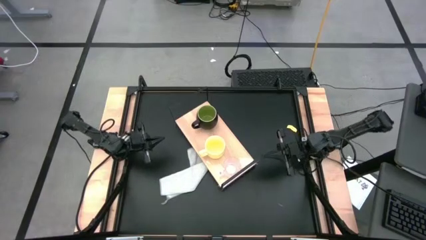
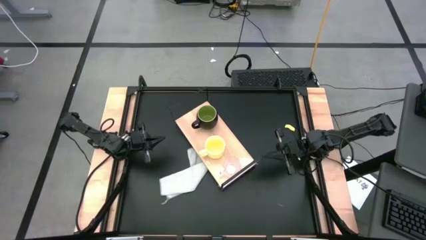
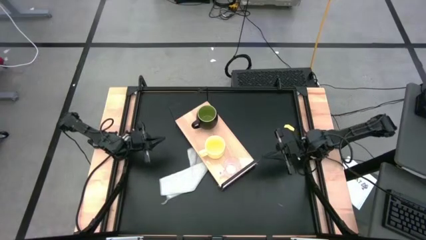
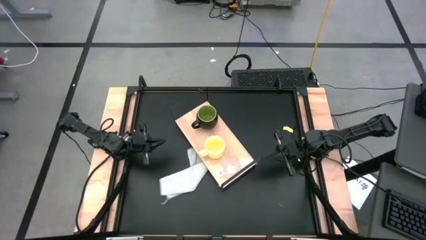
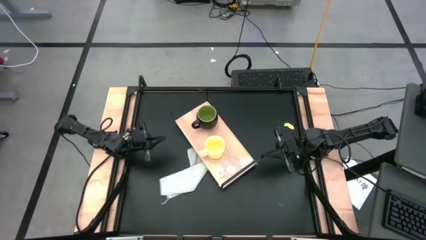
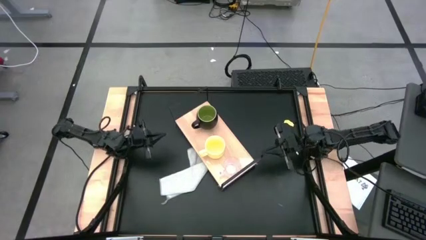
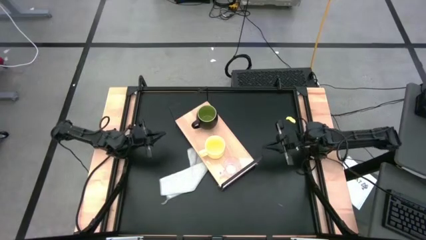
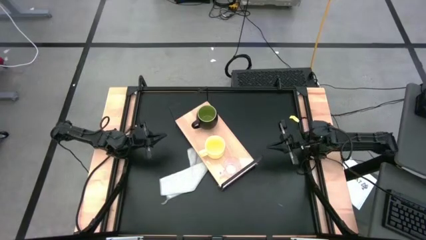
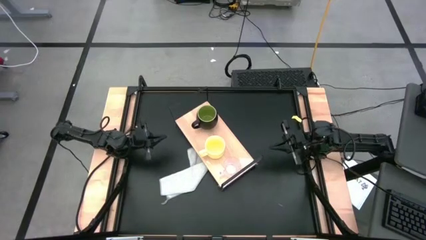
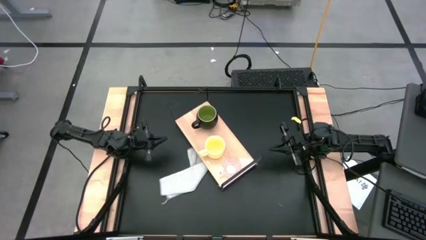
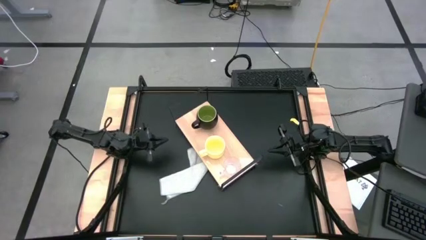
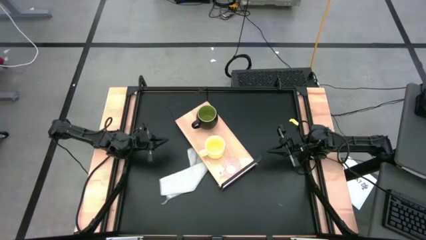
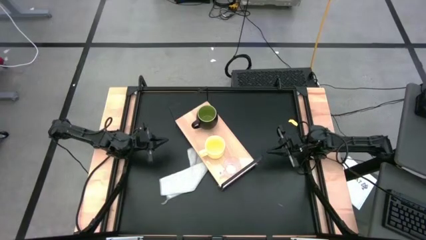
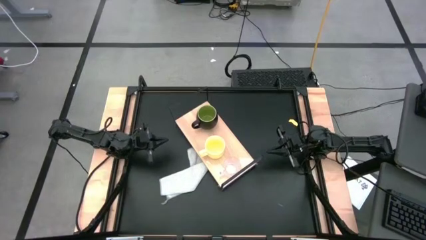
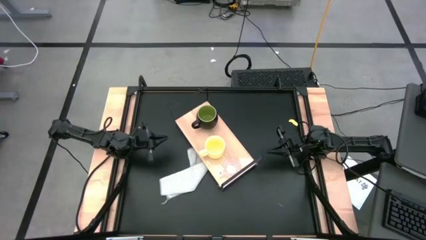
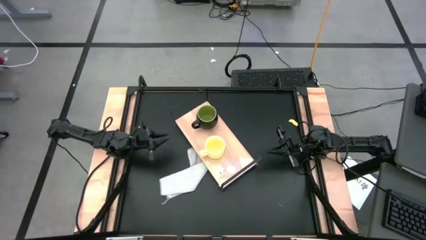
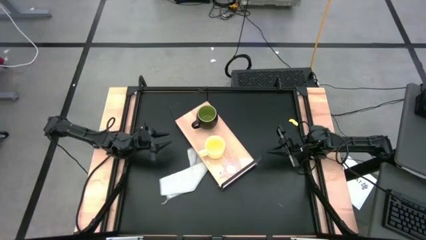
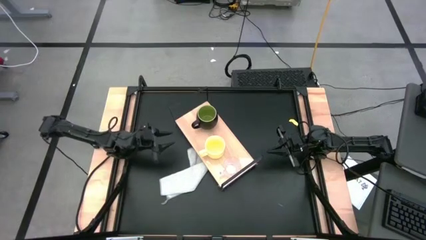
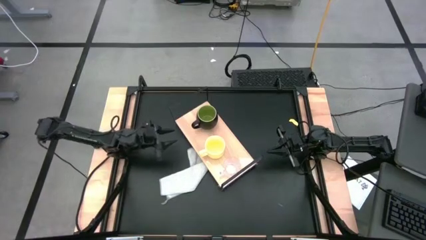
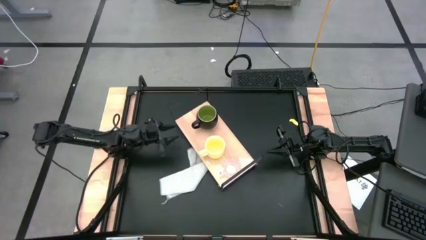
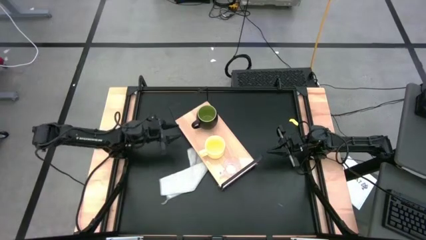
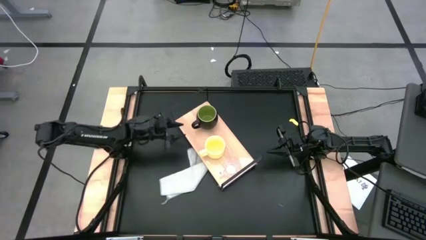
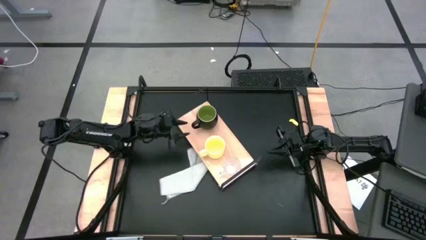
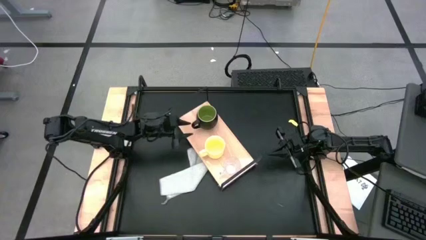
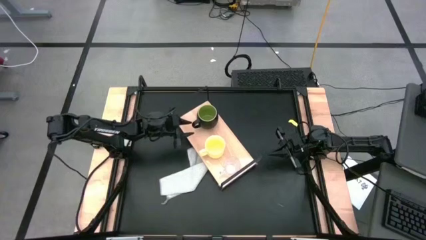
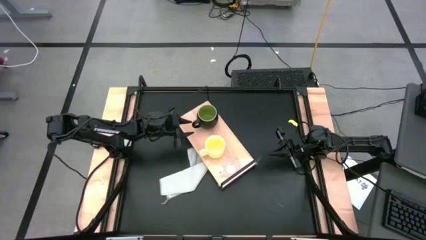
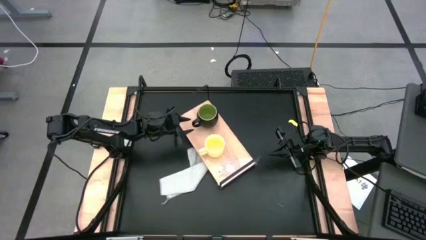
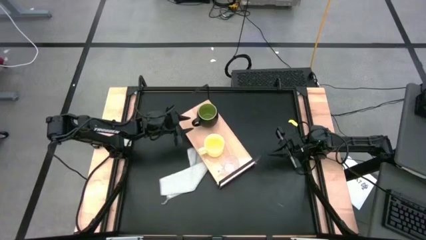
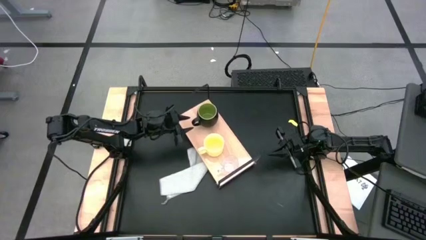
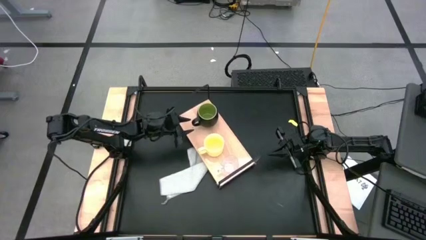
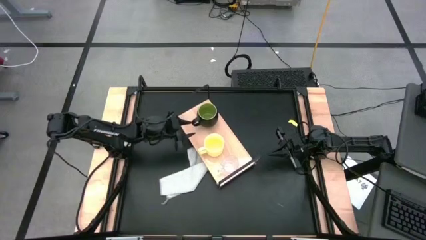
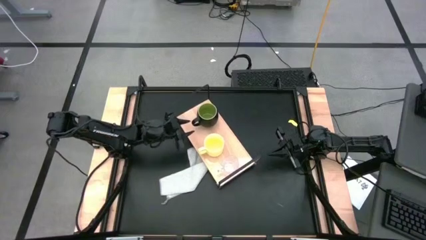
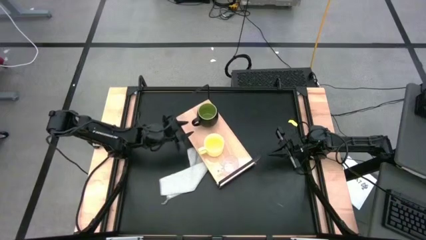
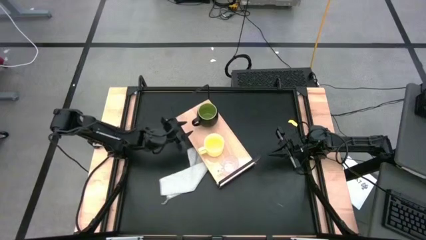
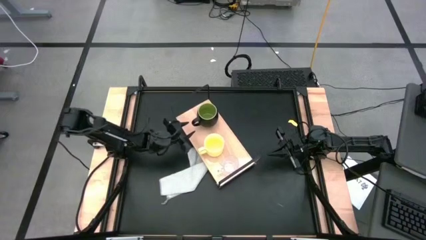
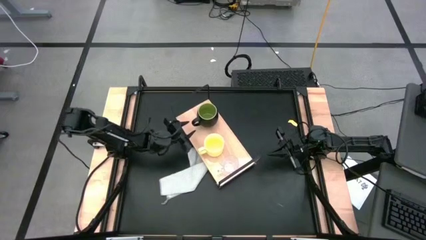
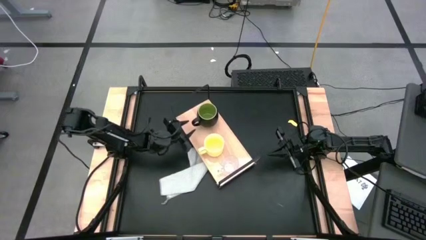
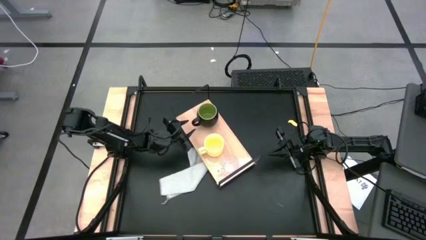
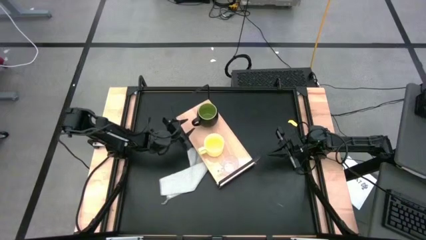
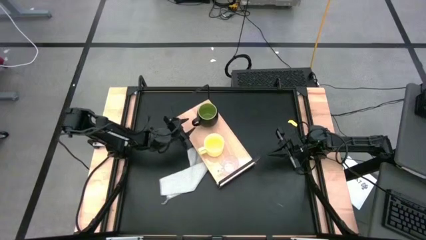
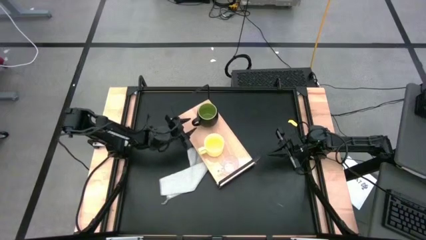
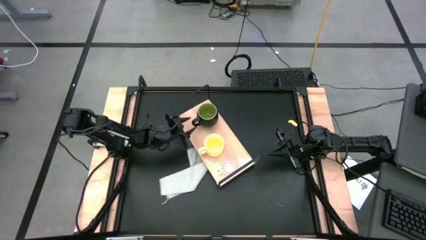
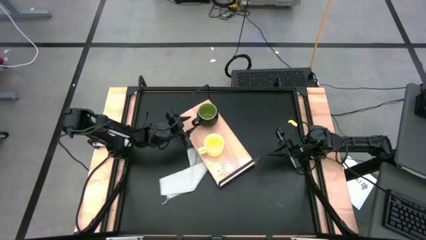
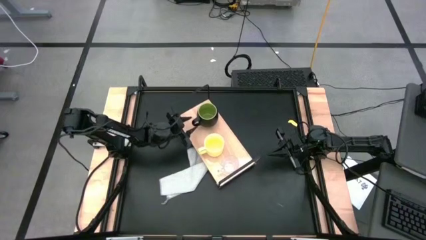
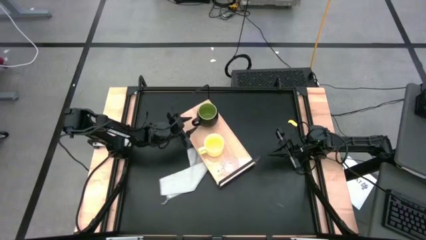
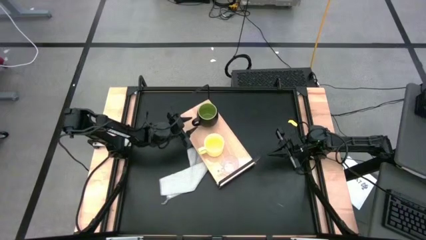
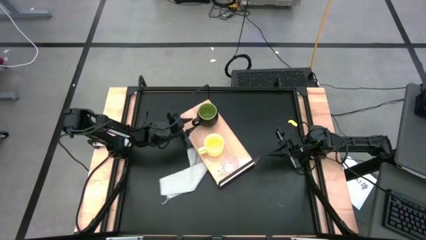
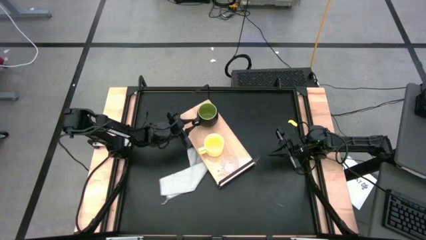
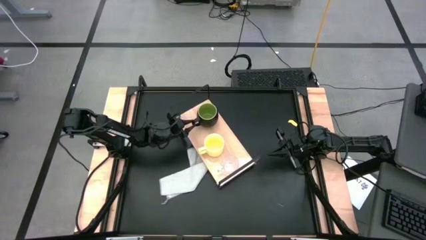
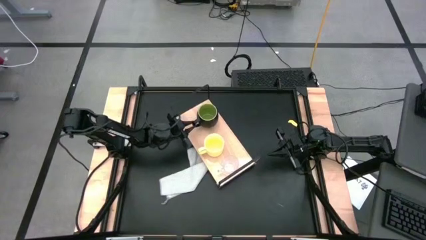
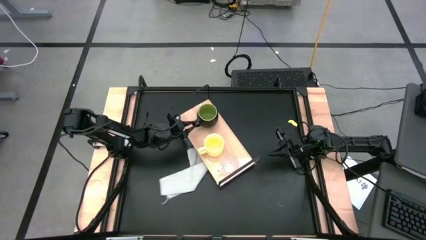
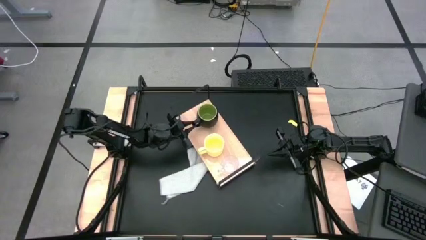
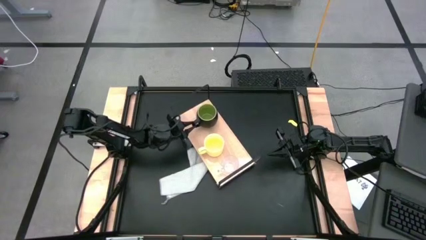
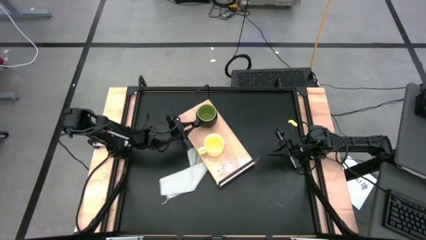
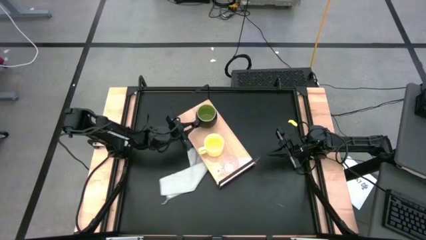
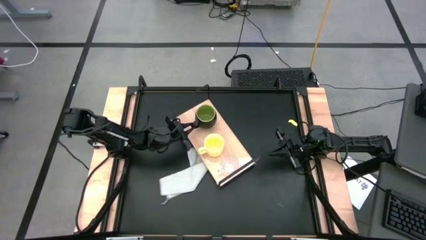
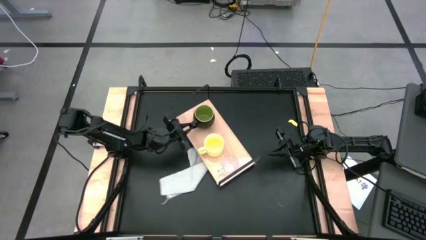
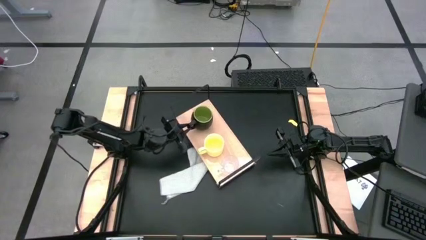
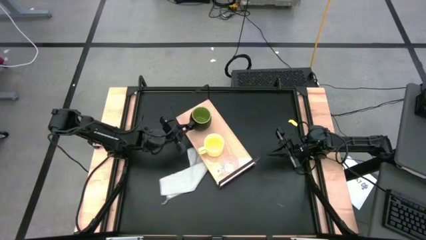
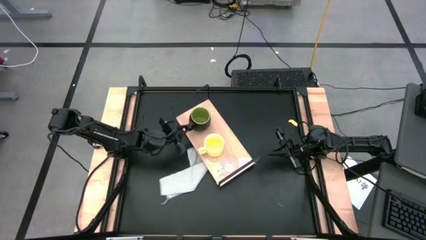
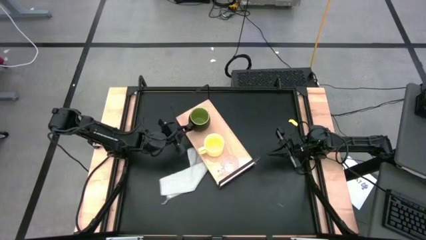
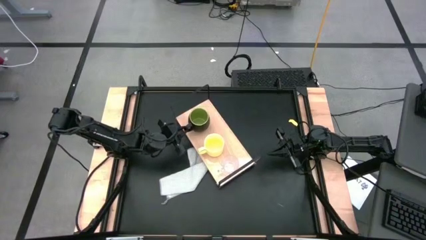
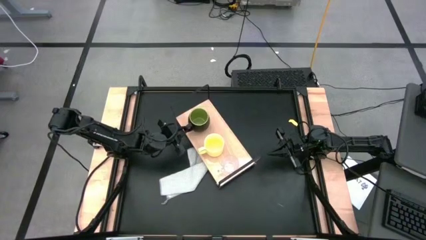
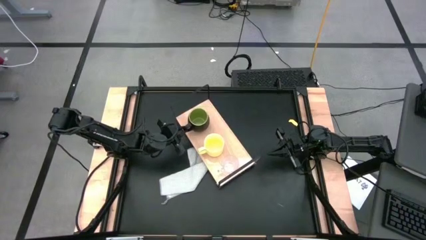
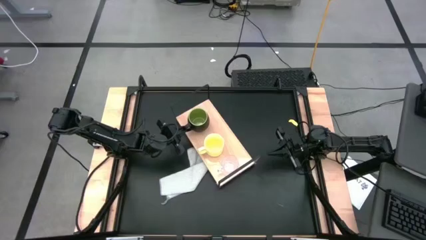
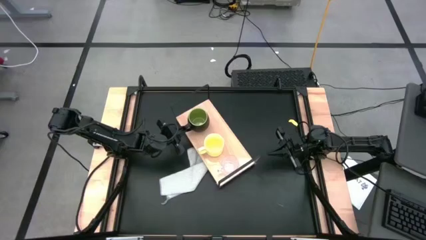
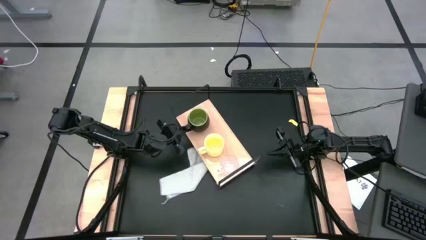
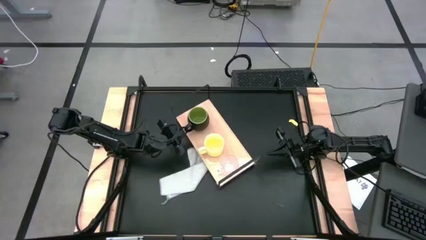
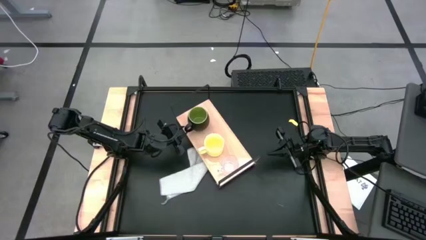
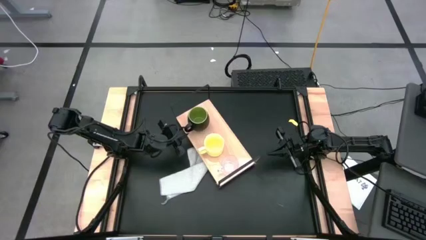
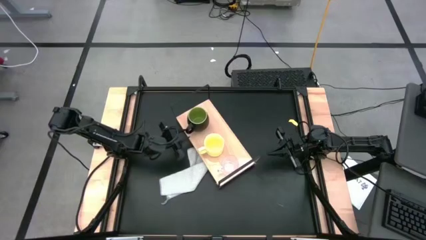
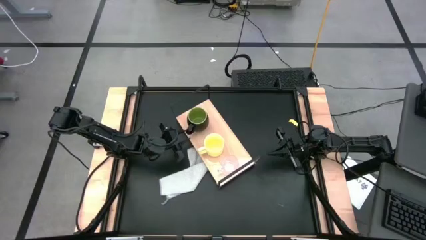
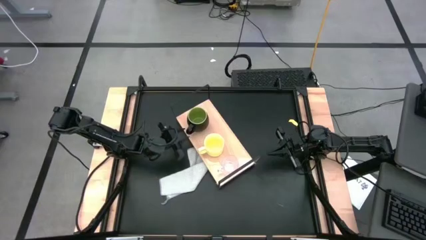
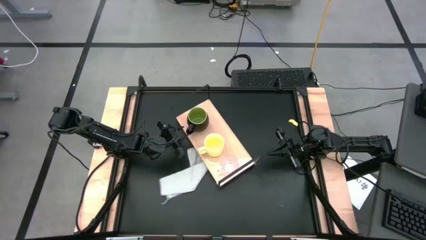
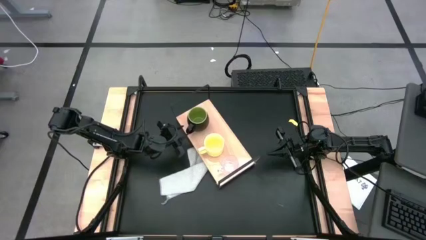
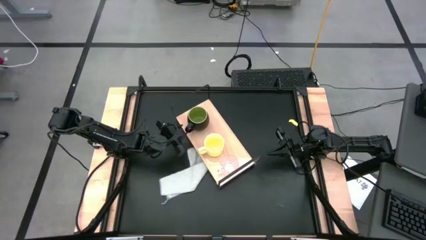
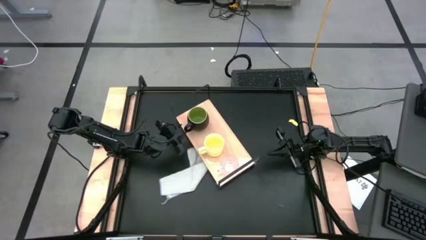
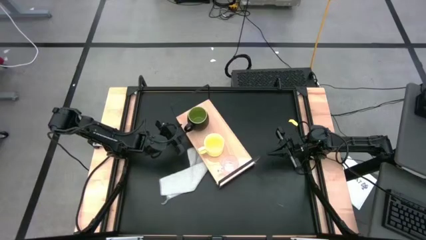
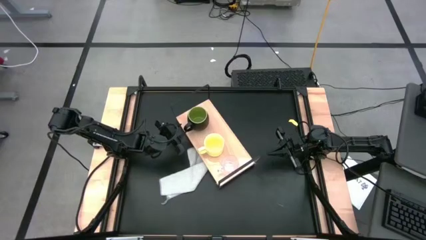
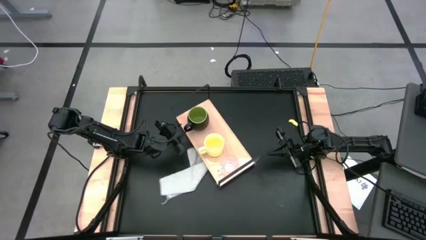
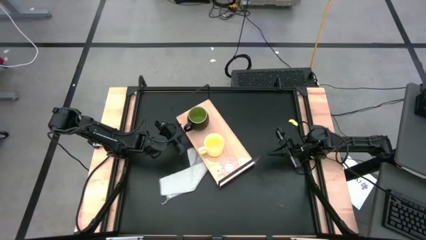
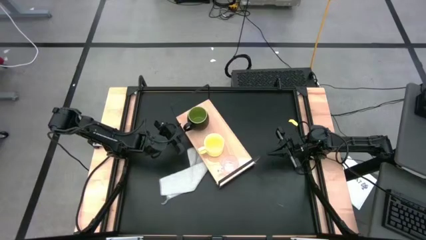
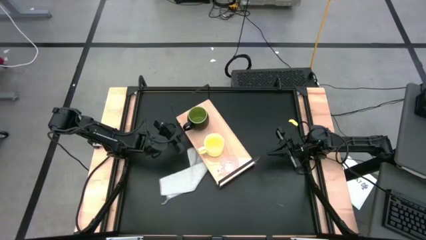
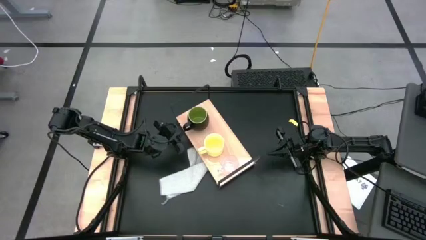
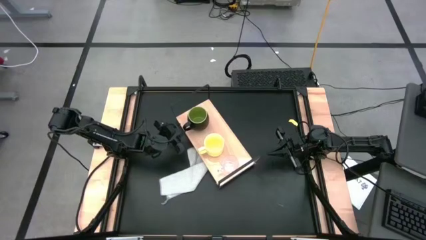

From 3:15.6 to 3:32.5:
Task: Stack small to large cups/mugs on shelf
Adjust all the mugs
